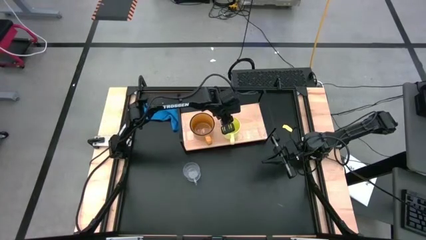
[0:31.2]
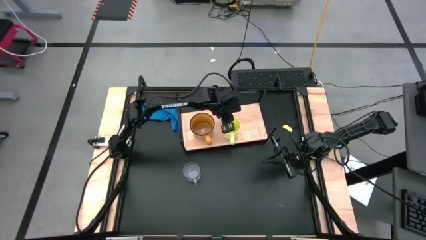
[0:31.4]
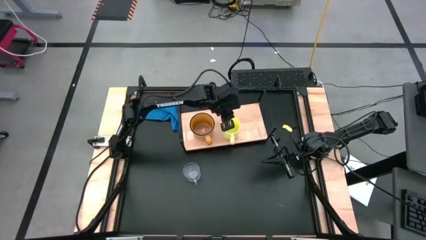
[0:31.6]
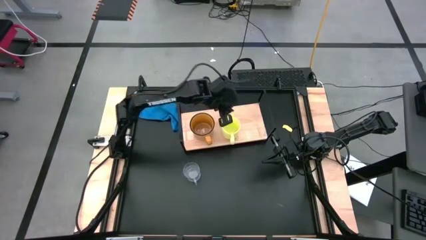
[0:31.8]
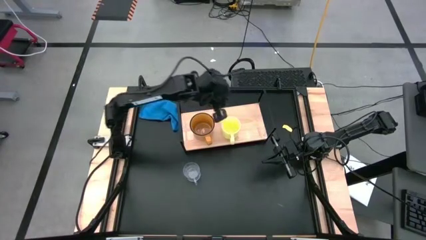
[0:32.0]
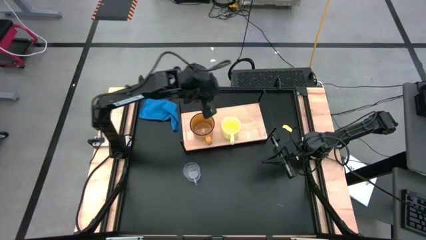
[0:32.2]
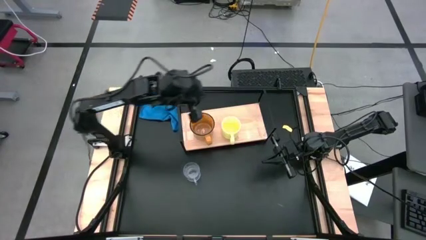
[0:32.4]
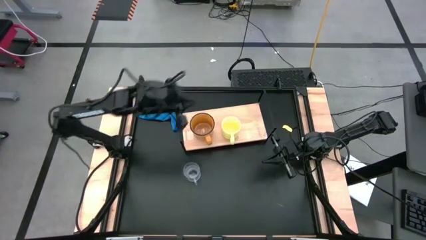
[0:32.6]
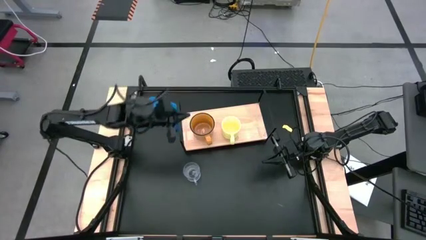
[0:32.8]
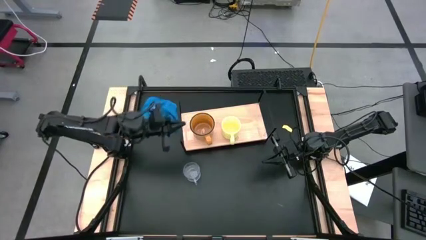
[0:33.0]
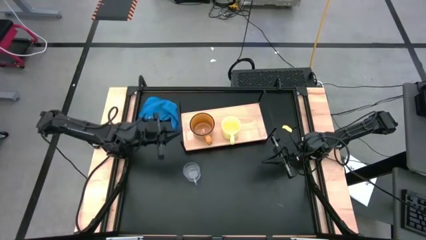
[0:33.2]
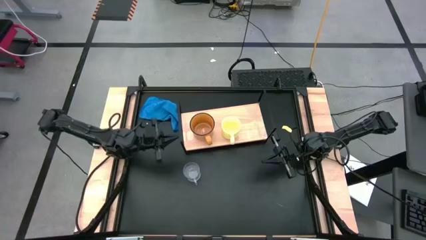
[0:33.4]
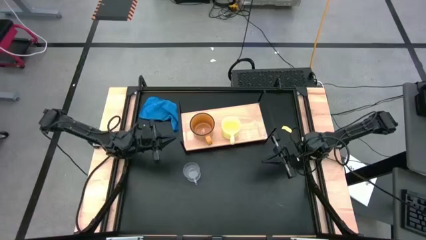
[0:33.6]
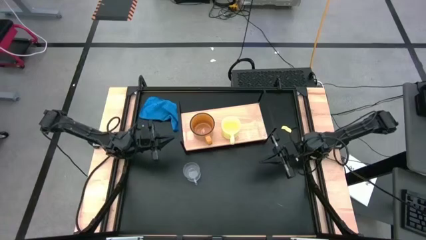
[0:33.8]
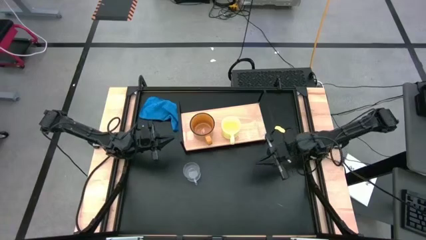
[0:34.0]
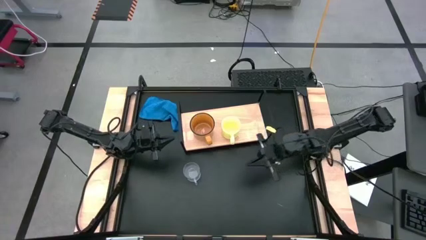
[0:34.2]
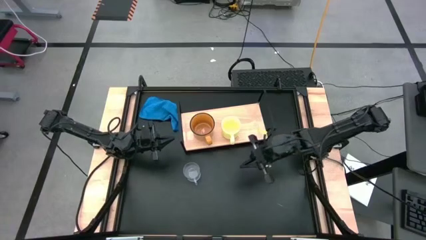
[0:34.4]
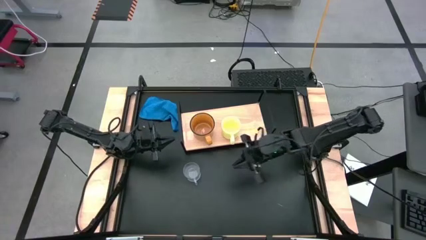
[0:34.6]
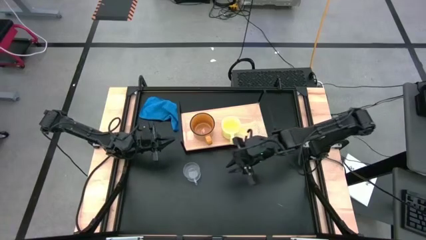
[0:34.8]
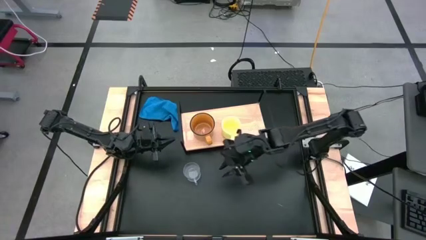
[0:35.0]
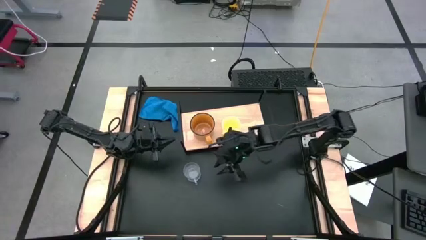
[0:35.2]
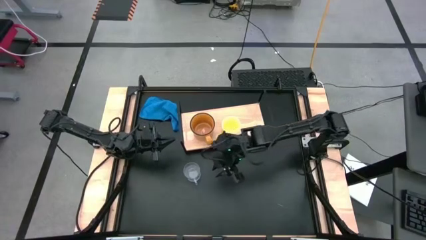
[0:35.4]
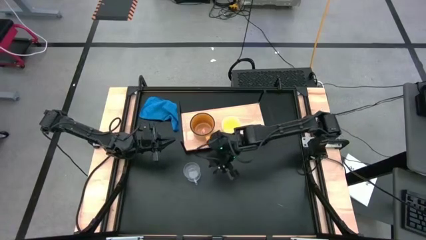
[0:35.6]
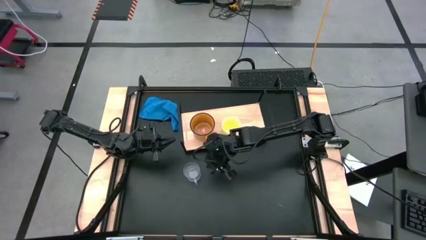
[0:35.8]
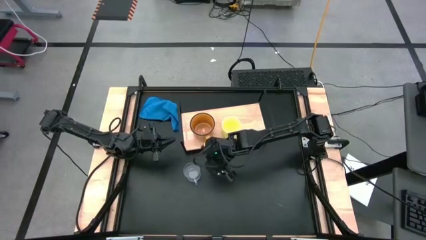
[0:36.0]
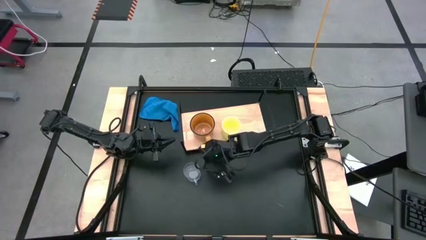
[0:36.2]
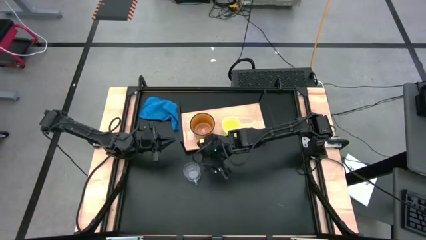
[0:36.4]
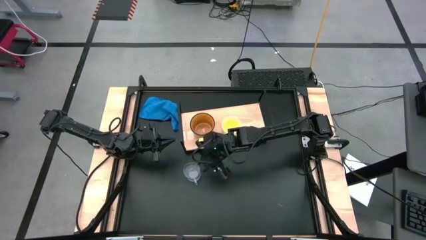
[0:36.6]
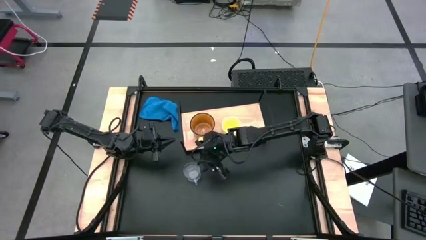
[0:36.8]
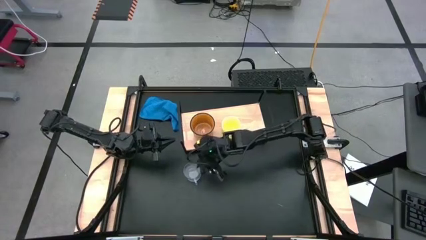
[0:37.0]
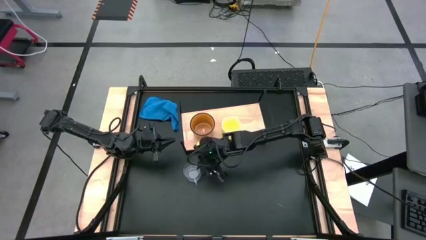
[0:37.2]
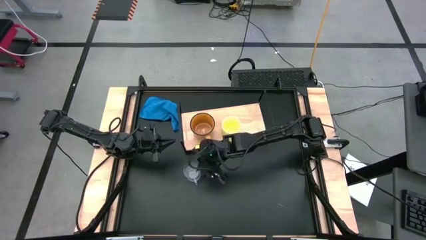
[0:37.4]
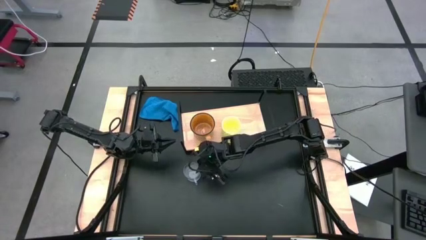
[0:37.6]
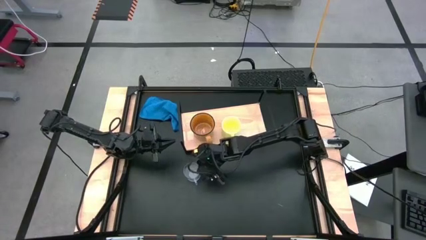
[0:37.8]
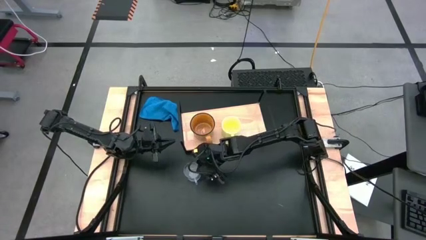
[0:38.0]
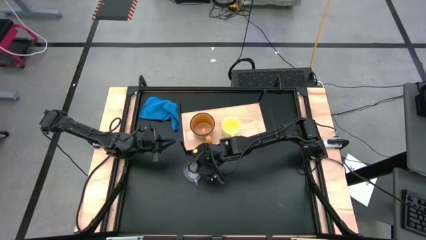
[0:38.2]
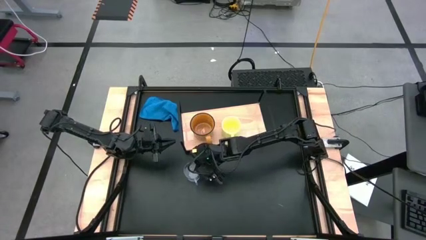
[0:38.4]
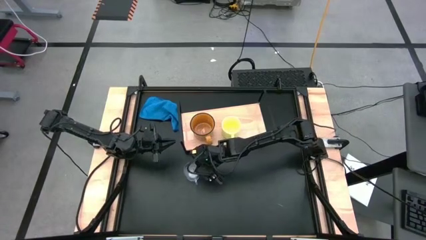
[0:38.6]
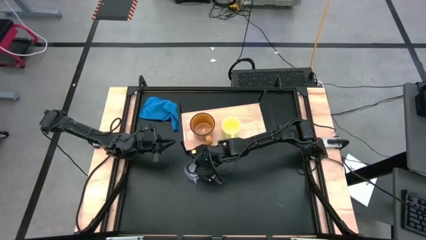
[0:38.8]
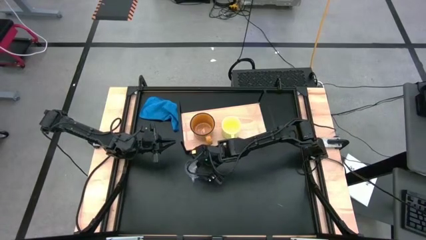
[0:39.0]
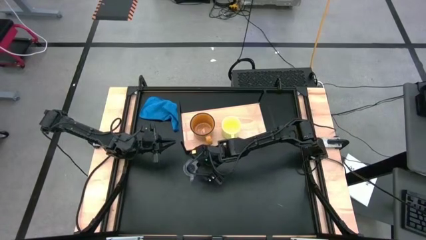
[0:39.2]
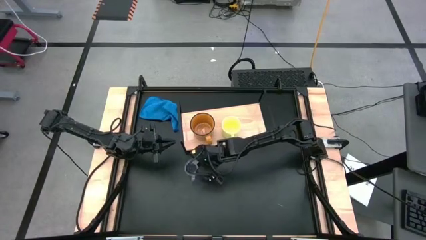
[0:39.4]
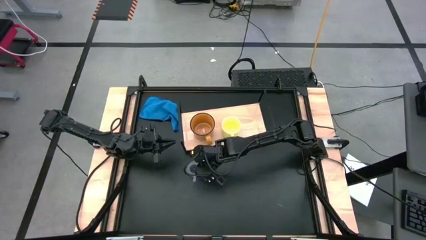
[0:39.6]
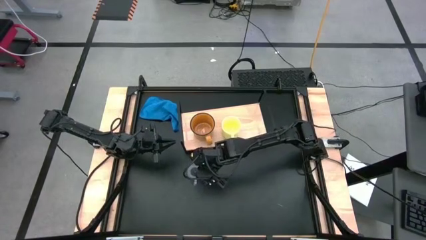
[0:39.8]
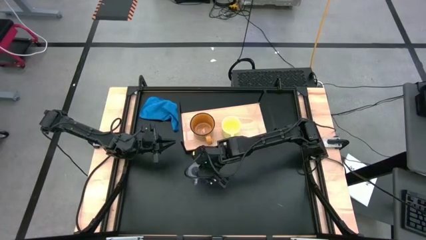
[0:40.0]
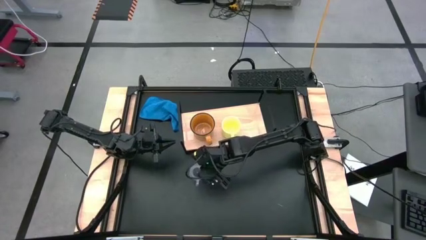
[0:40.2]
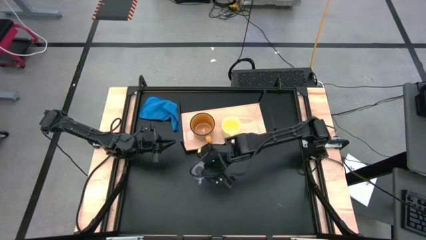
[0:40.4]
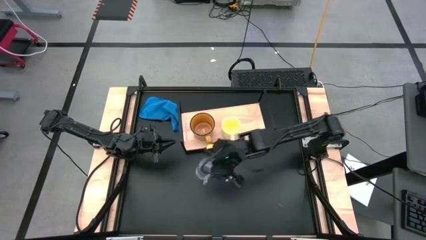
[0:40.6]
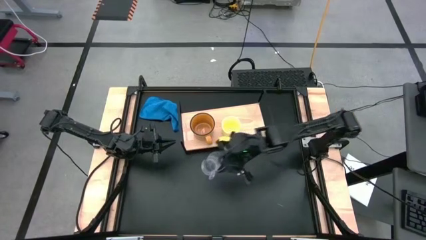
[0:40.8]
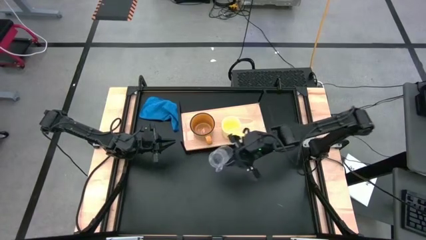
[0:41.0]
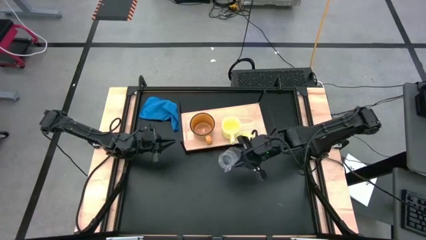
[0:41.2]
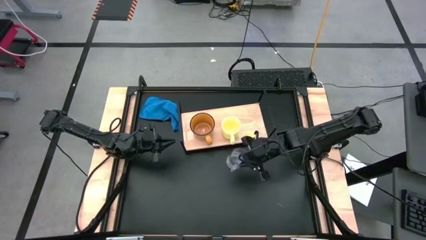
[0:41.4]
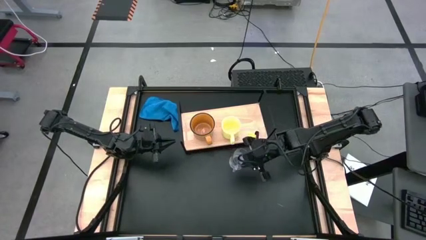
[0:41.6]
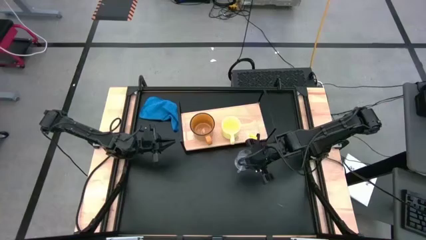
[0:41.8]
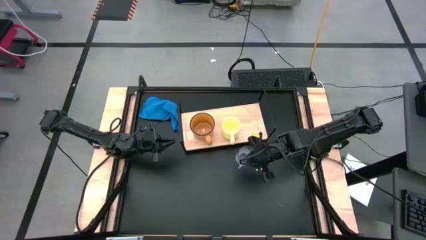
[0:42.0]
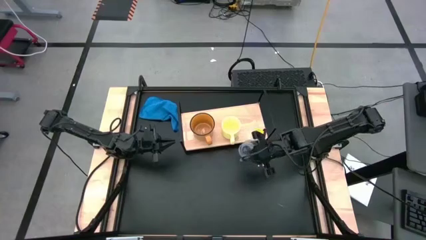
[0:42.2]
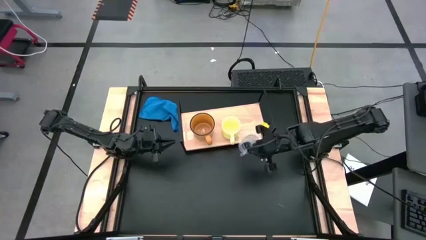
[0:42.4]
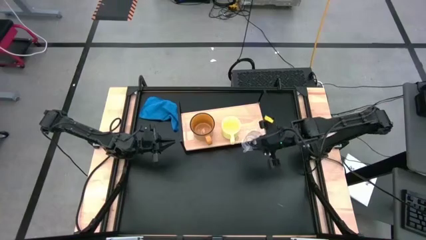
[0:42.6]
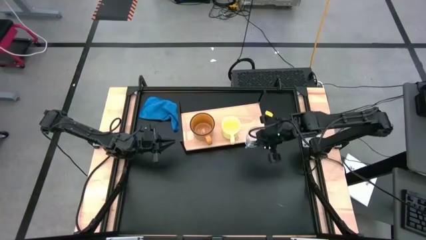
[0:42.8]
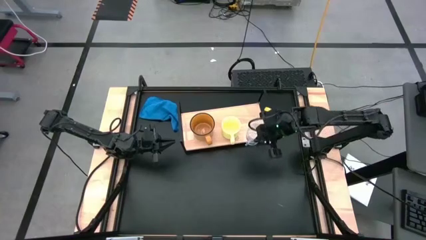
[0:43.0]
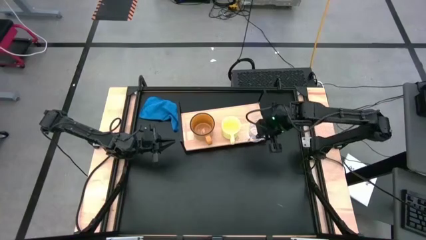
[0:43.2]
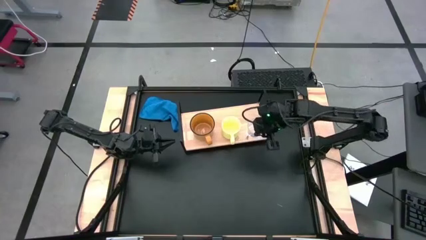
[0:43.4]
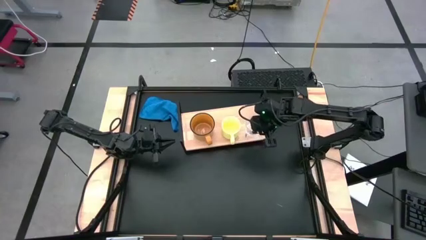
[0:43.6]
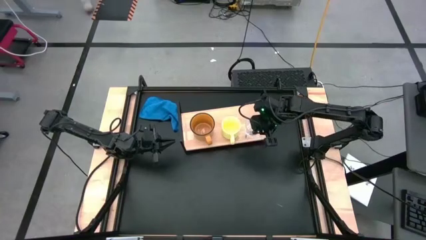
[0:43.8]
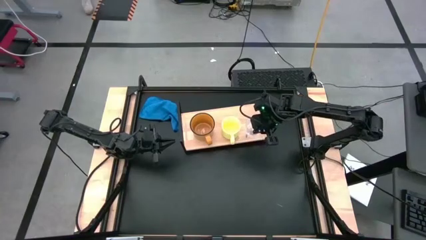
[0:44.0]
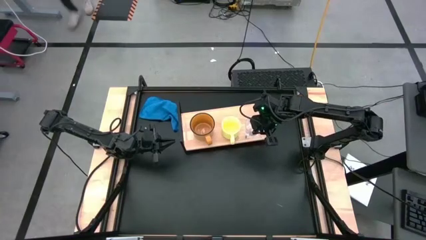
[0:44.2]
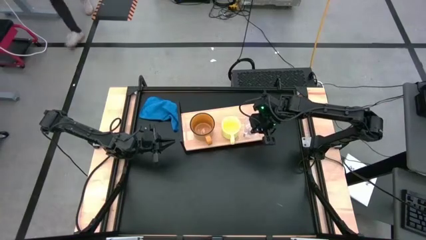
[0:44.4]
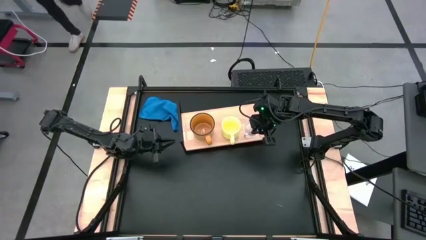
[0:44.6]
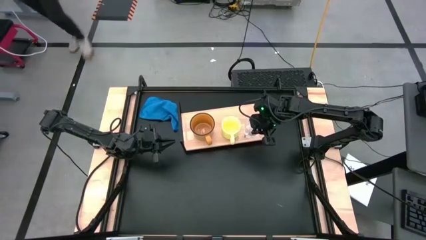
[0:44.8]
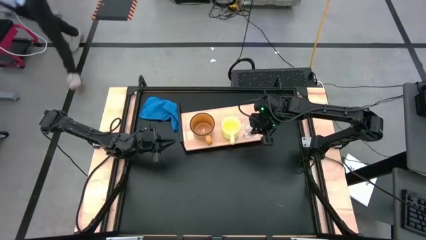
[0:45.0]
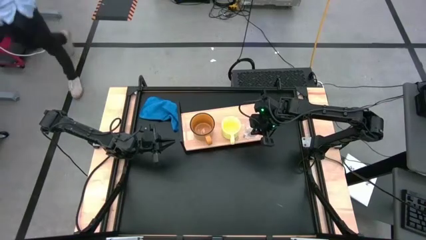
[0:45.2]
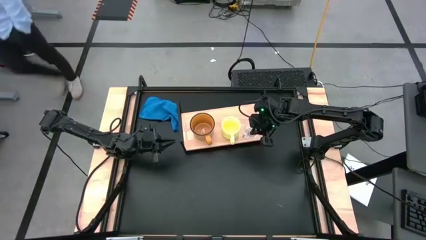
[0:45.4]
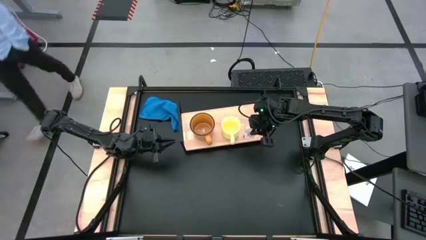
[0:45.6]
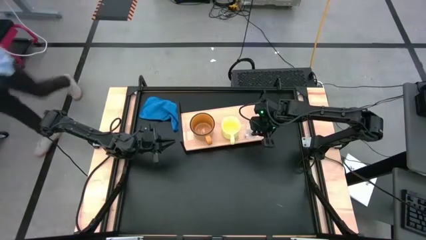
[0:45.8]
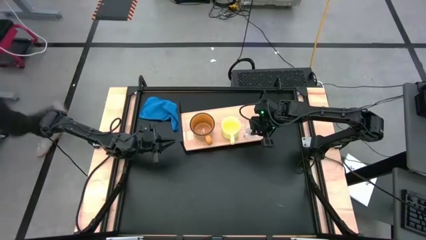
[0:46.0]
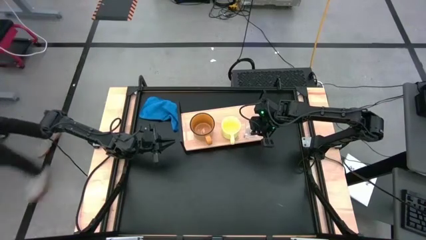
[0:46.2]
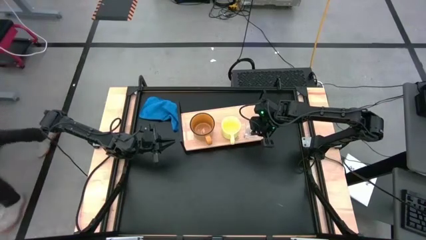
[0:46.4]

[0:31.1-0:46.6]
Task: Stack small to large cups/mugs on shelf
Put the transparent mug on the shelf
